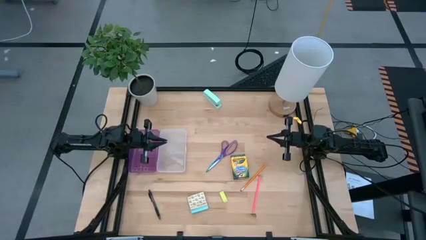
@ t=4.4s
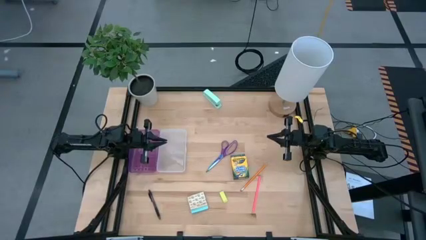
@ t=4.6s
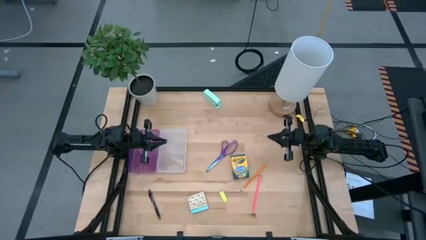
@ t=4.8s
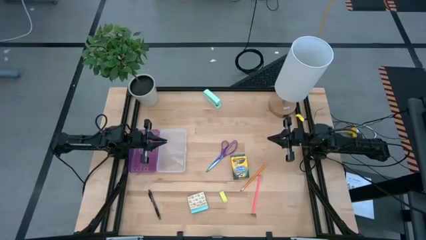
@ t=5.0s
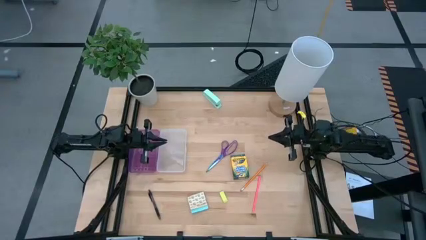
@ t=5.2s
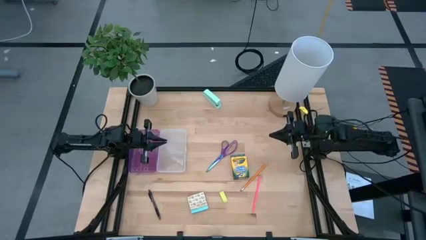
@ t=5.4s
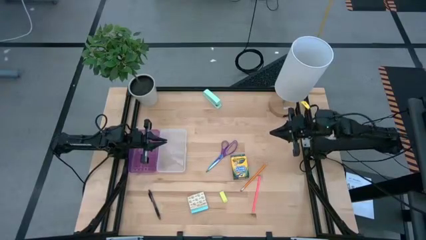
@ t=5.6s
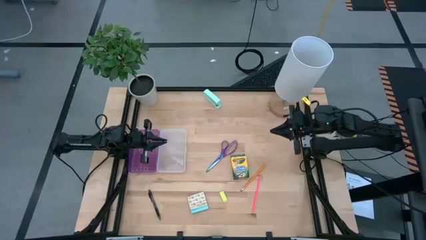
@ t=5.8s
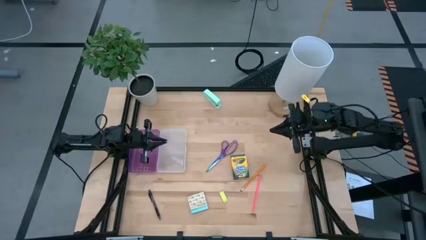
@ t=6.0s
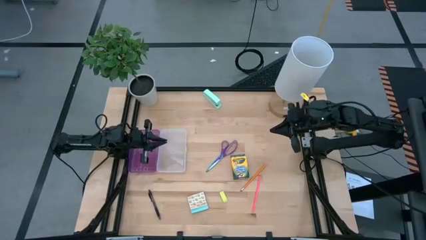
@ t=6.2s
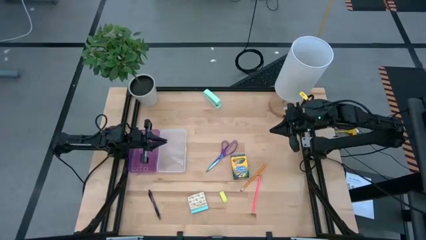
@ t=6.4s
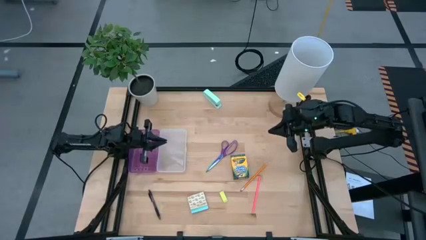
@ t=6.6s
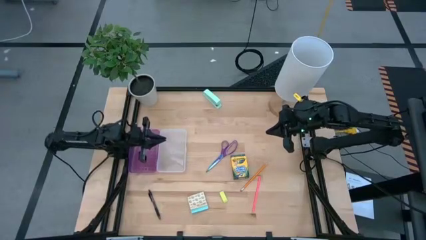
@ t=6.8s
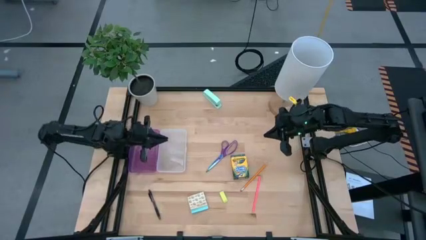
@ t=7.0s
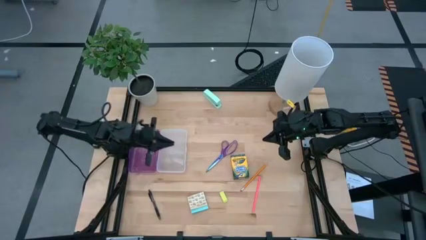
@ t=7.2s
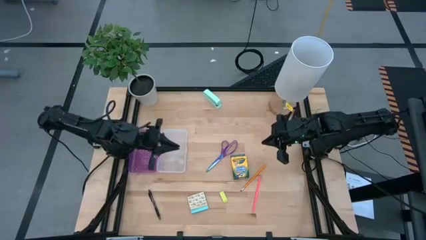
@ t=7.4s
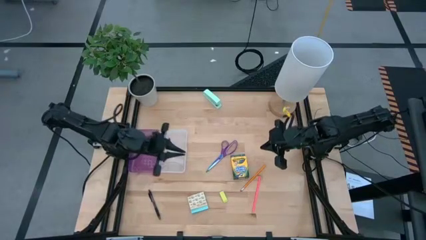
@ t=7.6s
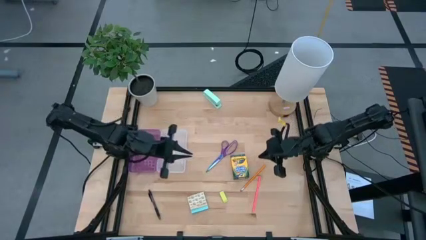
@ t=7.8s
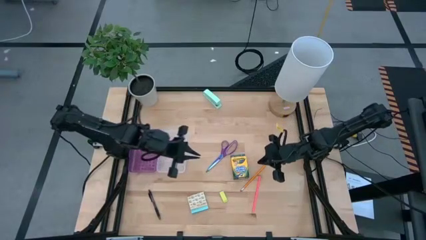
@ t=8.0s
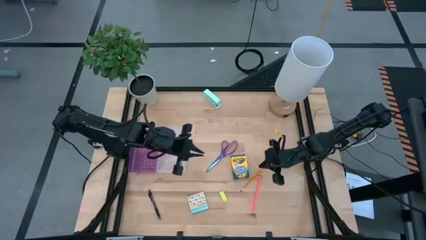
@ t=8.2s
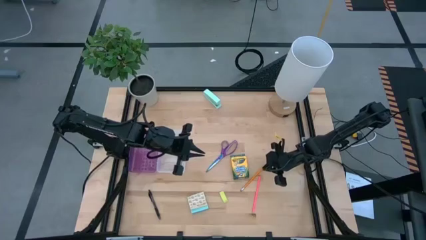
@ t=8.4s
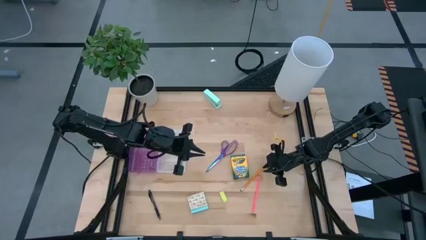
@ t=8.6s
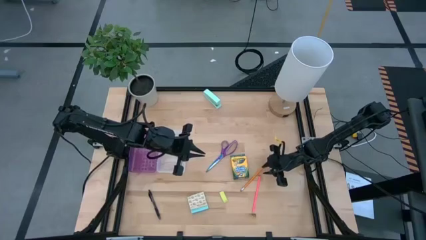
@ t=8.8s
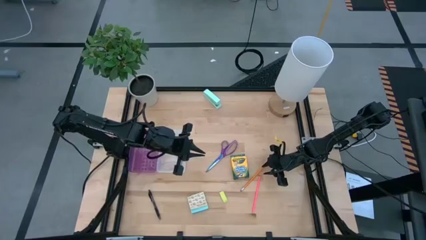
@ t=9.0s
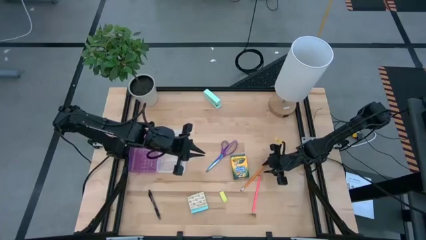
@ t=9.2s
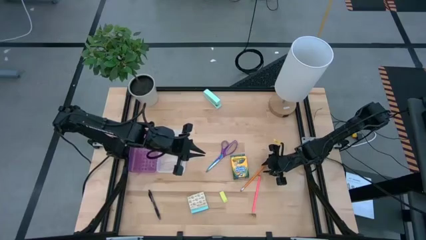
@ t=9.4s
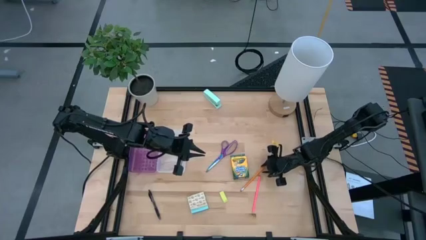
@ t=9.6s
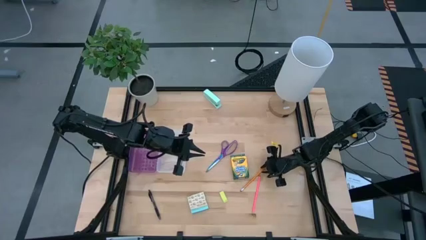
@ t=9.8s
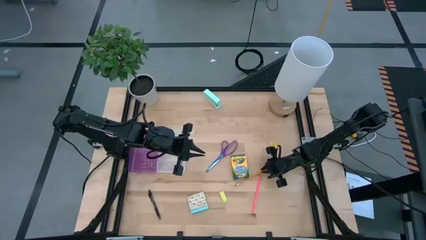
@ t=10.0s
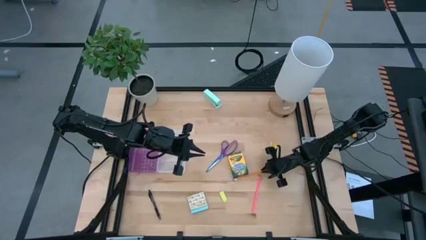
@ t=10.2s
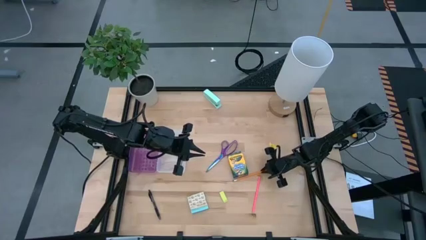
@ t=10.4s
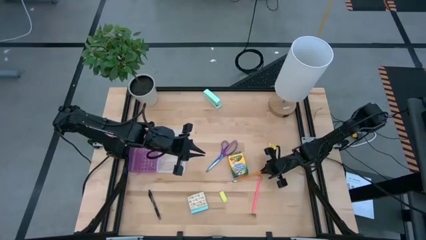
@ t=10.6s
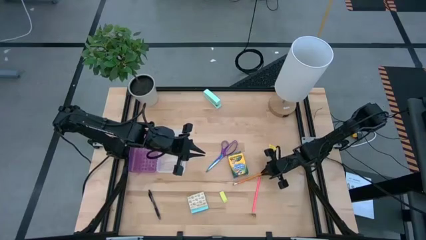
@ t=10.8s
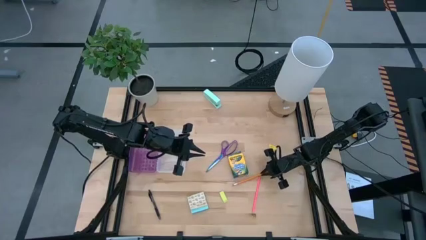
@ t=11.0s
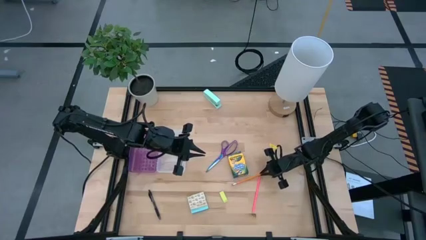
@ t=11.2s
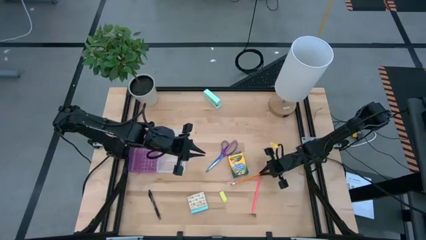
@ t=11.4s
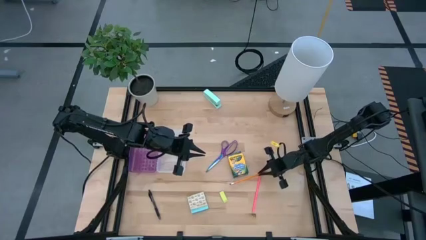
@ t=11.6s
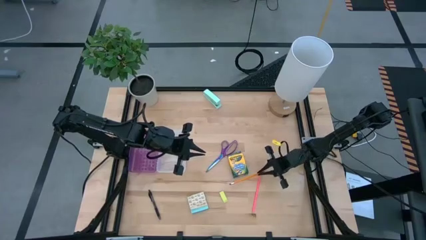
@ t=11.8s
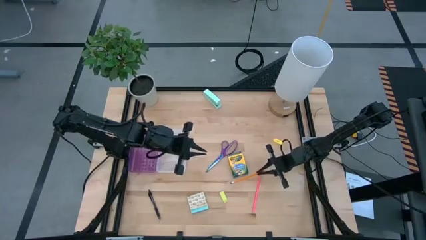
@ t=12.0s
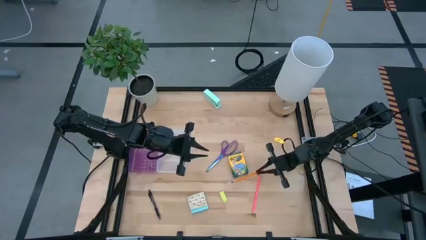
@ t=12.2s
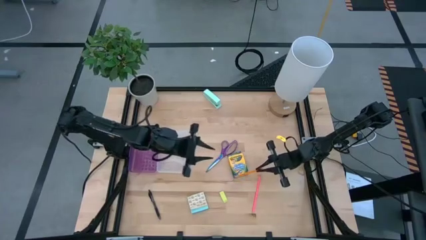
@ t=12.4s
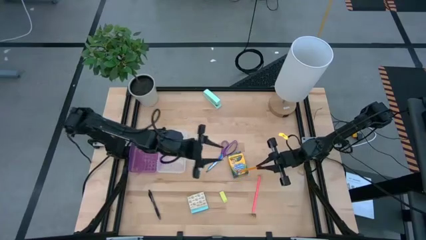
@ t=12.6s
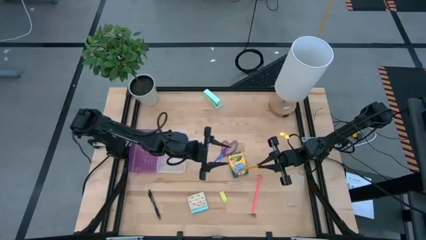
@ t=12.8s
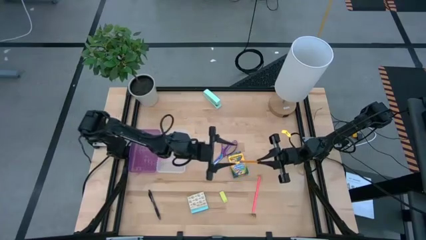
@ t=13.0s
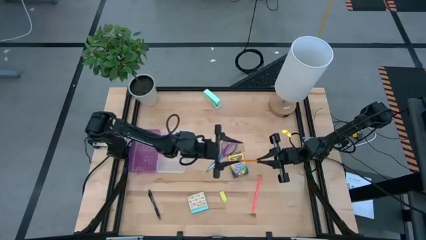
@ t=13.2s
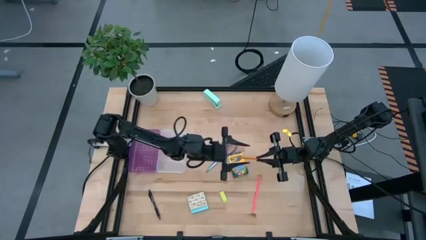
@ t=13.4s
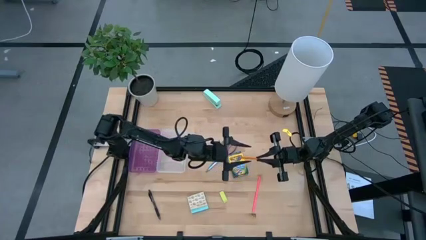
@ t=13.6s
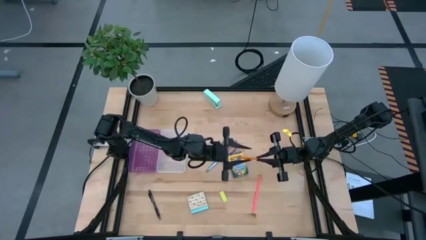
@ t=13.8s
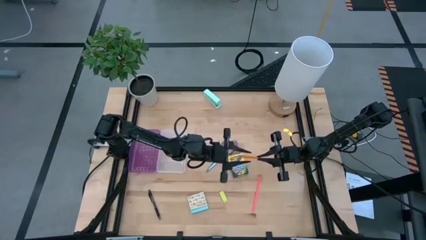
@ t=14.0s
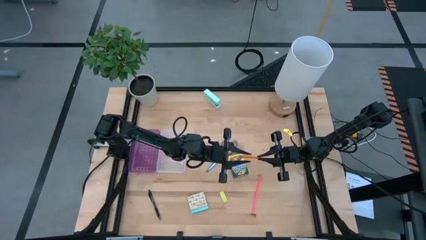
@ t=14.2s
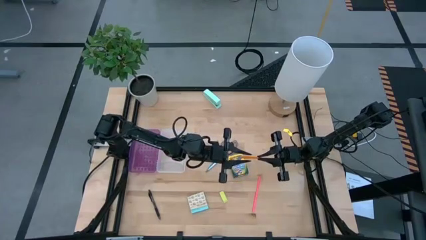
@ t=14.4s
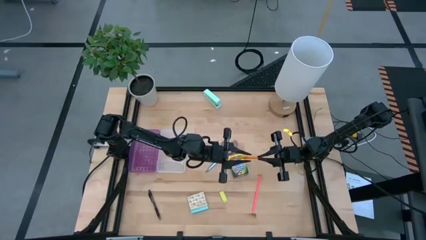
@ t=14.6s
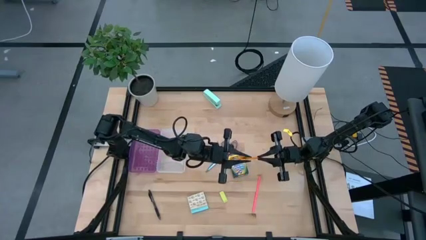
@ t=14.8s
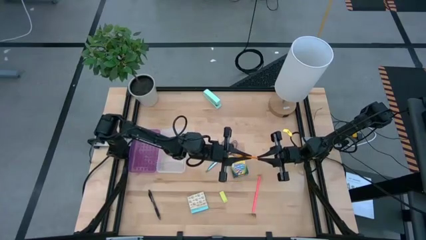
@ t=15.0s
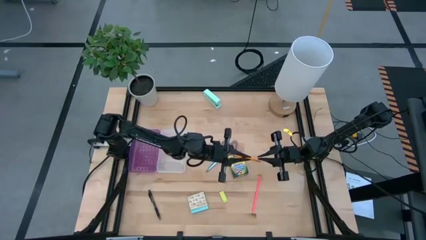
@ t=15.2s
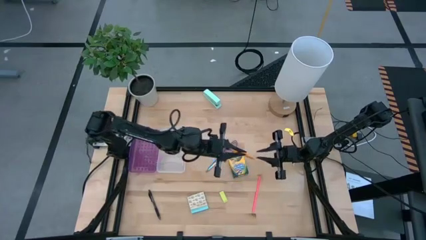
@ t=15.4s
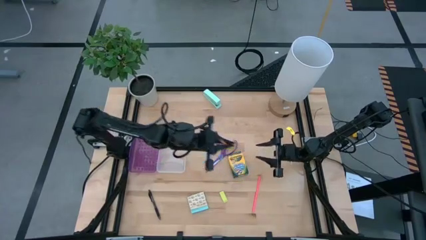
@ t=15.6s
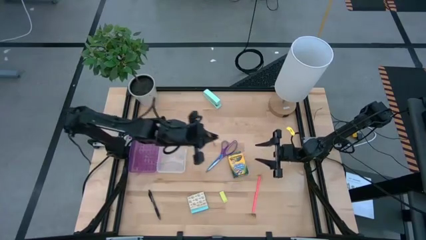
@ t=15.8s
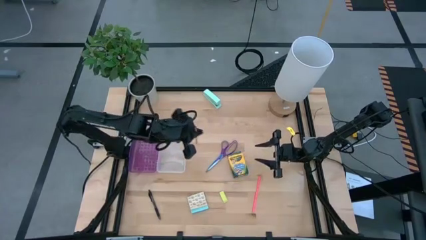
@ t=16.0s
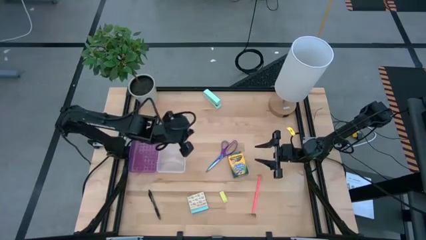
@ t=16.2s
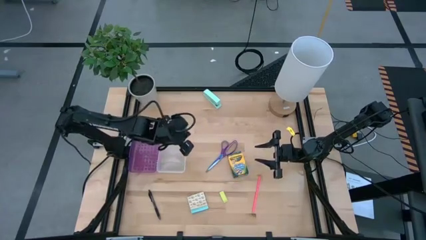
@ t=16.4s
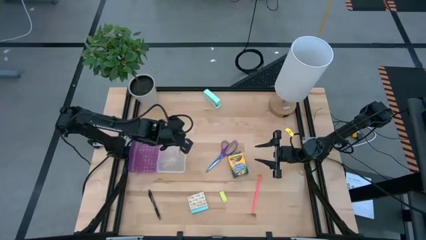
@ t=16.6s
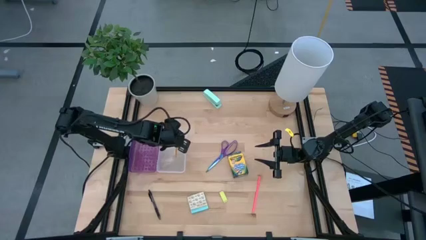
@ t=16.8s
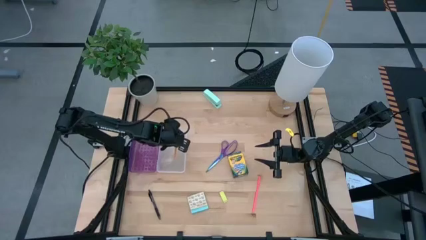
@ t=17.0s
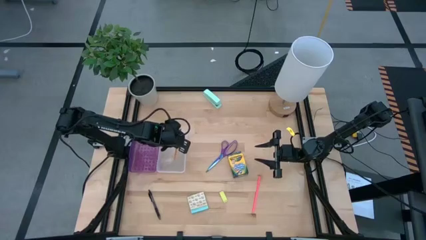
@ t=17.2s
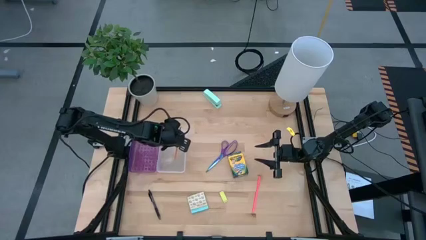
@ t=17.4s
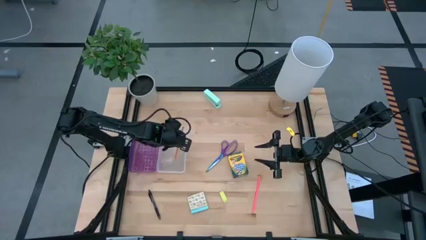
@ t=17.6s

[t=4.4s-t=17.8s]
Task: Pack school essentials
Put the orange pencil into the purple supply box
